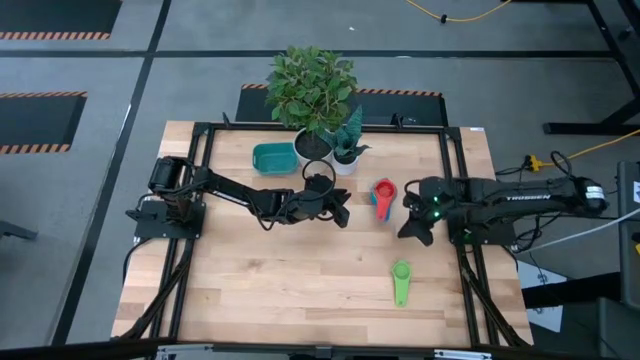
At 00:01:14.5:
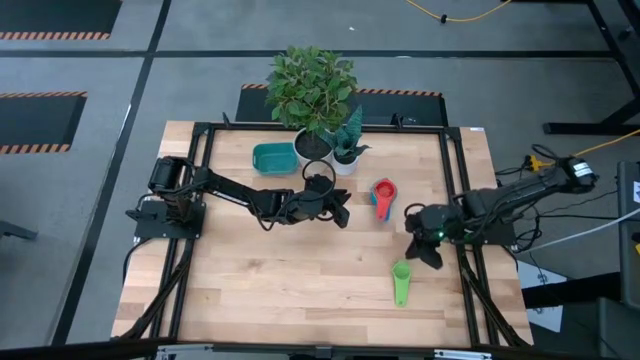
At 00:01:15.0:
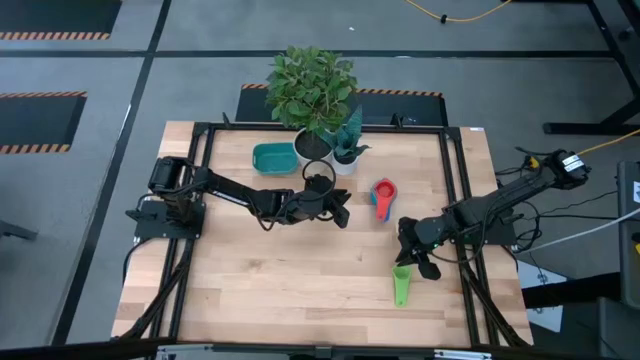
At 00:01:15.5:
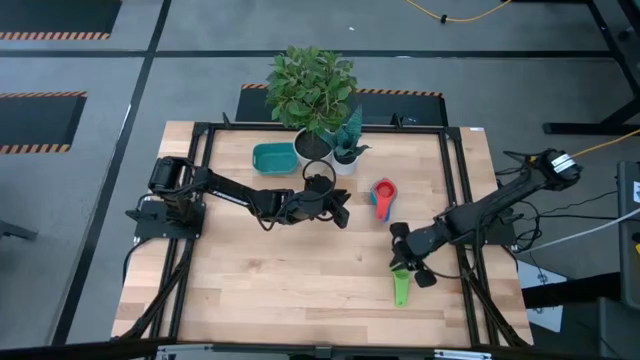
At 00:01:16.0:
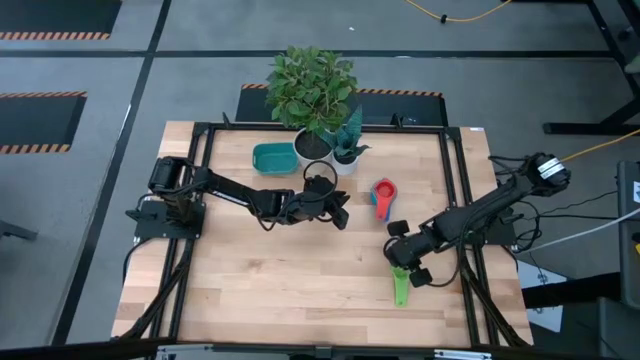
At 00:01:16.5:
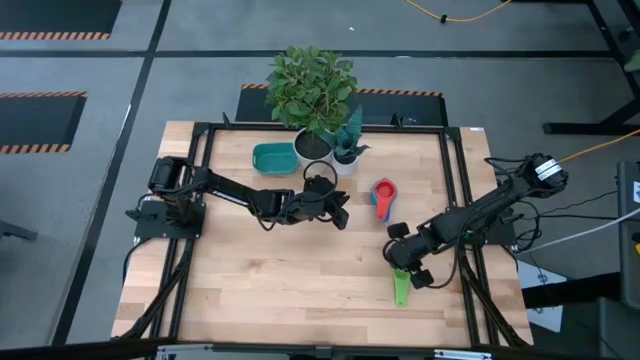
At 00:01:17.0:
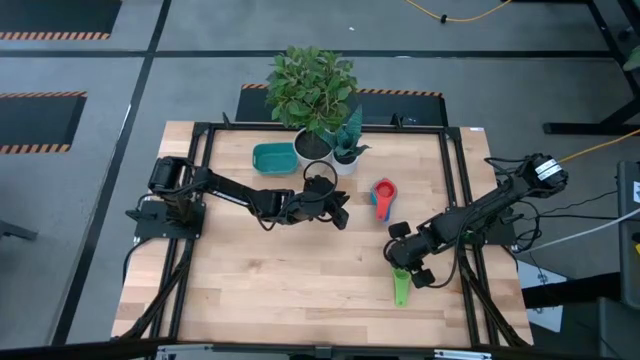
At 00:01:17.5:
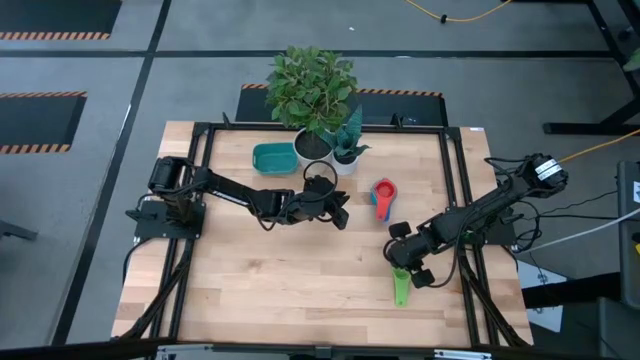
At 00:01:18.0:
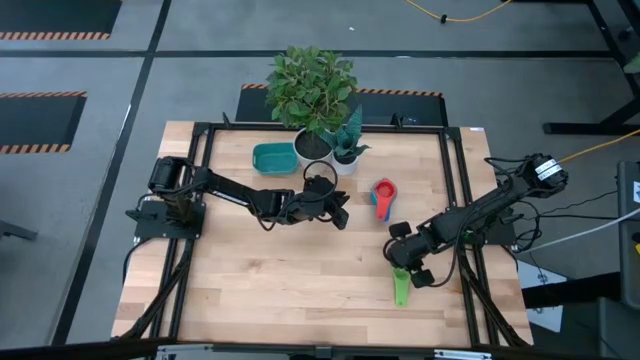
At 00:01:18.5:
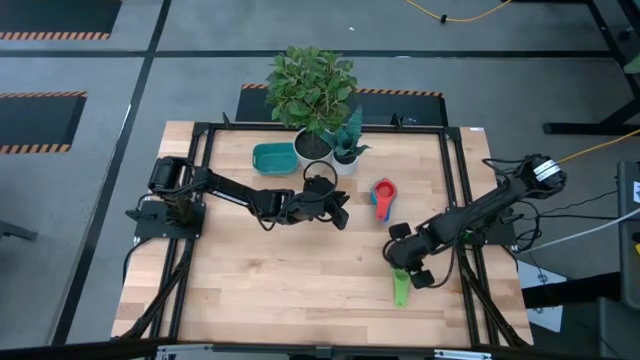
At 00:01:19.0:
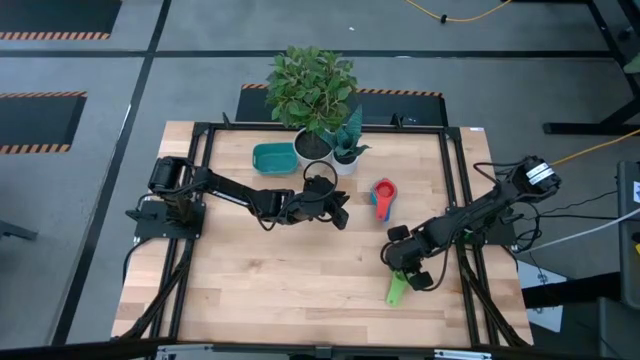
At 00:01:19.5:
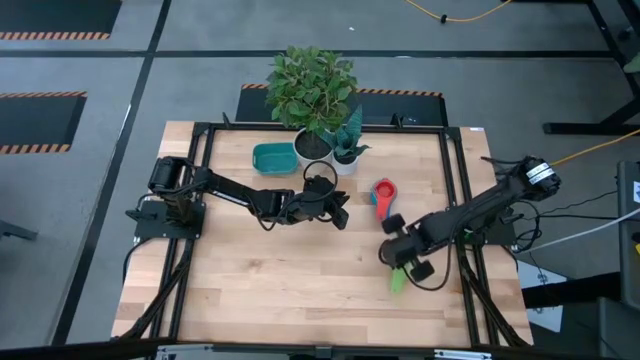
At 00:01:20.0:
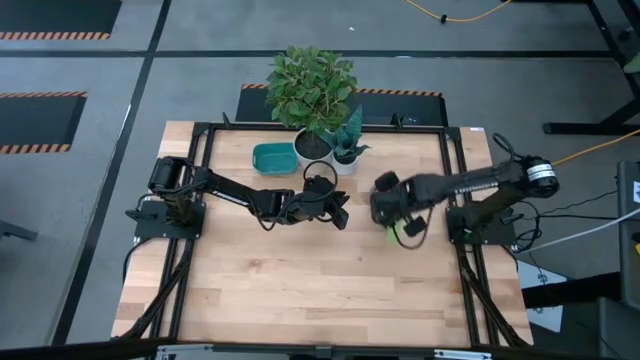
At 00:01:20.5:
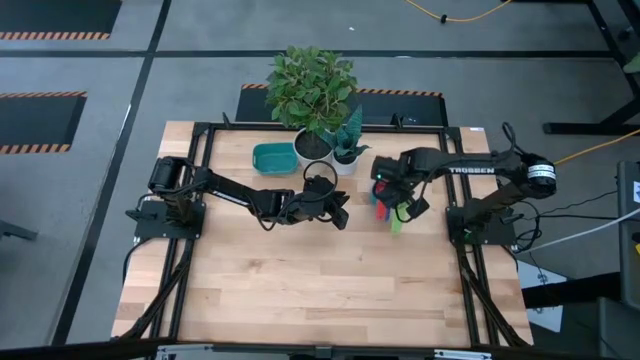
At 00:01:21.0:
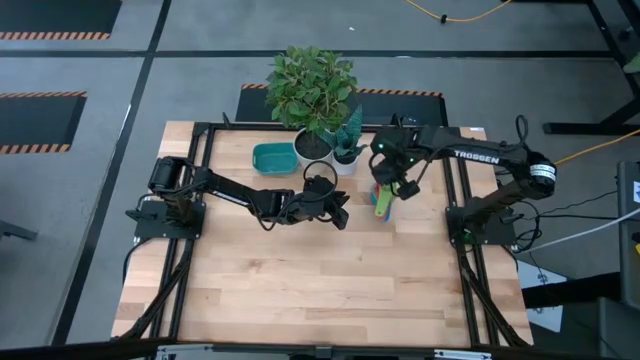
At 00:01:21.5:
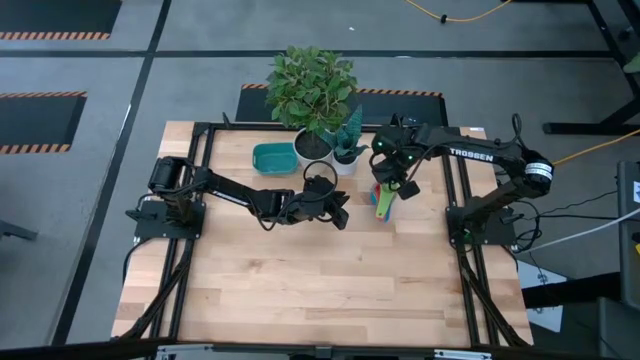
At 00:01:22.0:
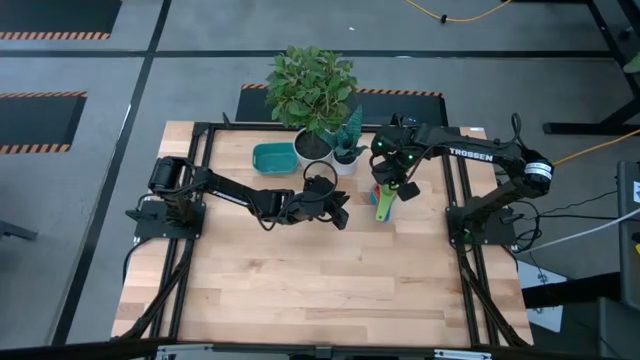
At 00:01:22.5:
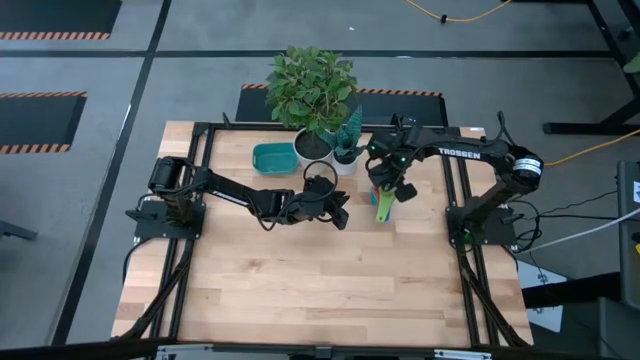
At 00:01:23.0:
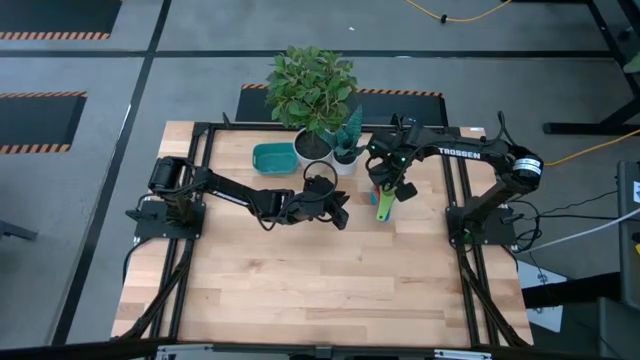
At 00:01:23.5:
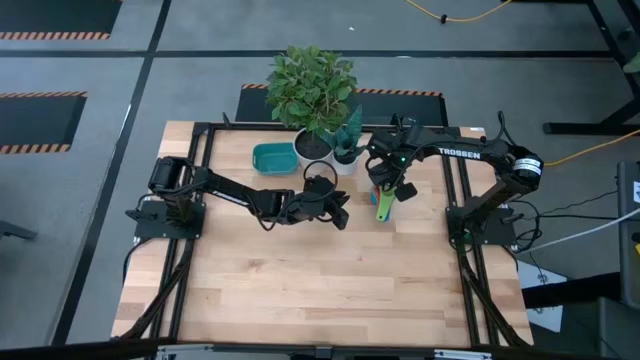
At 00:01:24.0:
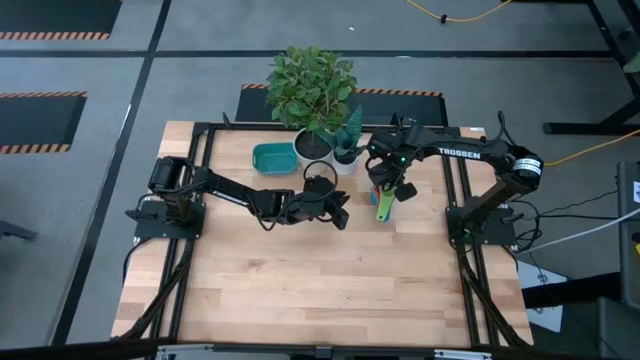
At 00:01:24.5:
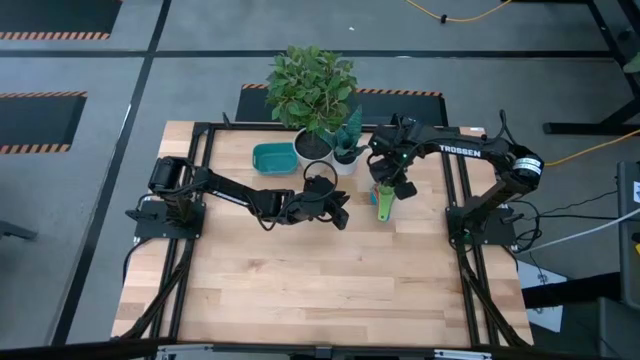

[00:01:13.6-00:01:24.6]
Task: Nest measuring cups in basket
Stack the green measuring cup on top of the red measuring cup

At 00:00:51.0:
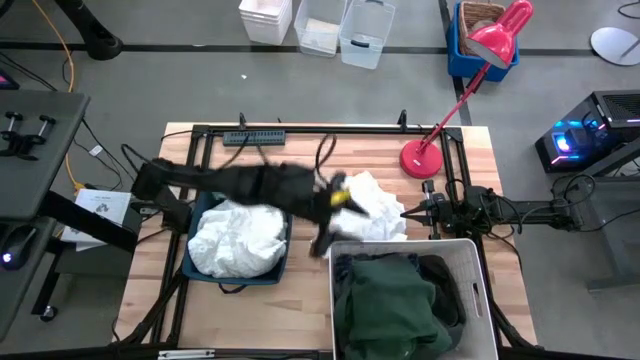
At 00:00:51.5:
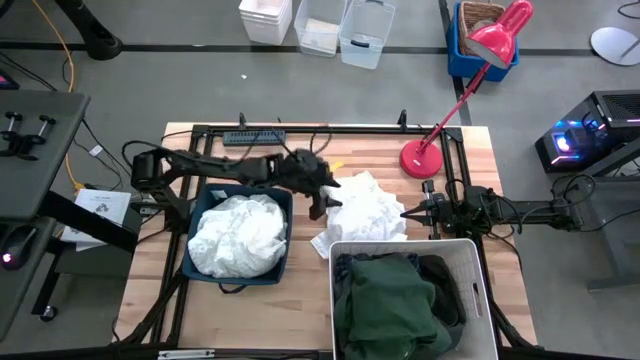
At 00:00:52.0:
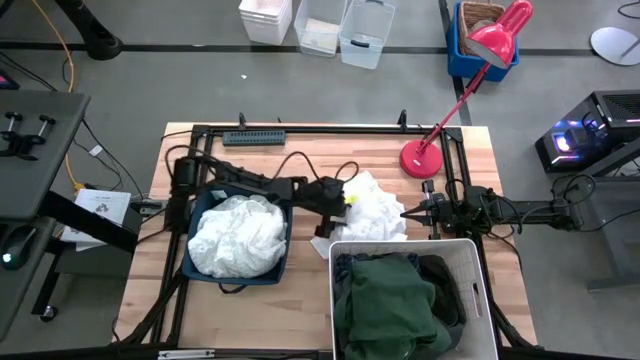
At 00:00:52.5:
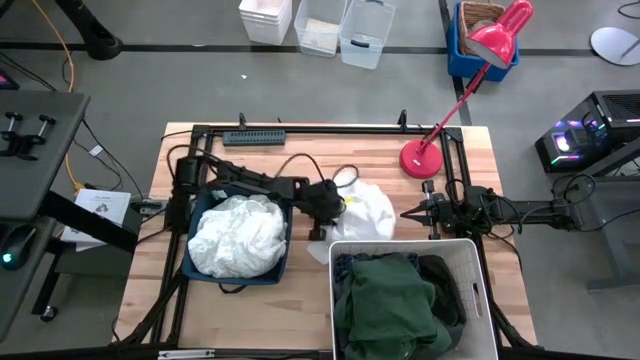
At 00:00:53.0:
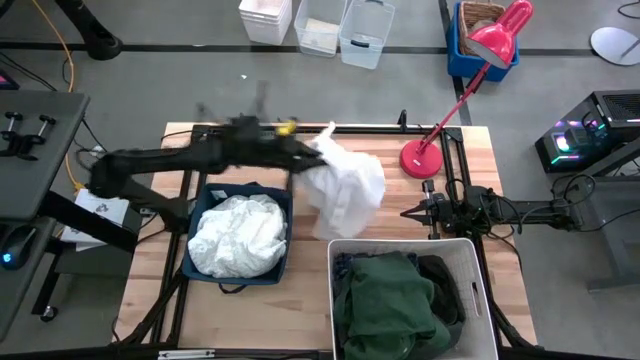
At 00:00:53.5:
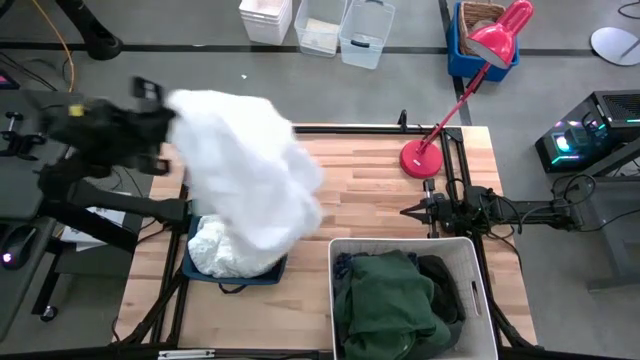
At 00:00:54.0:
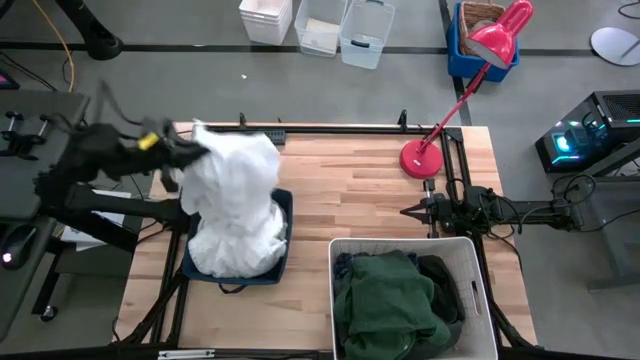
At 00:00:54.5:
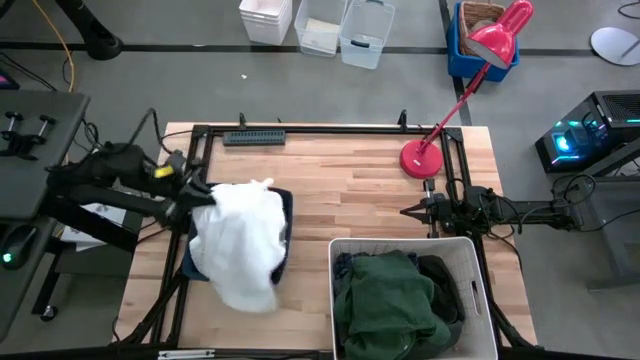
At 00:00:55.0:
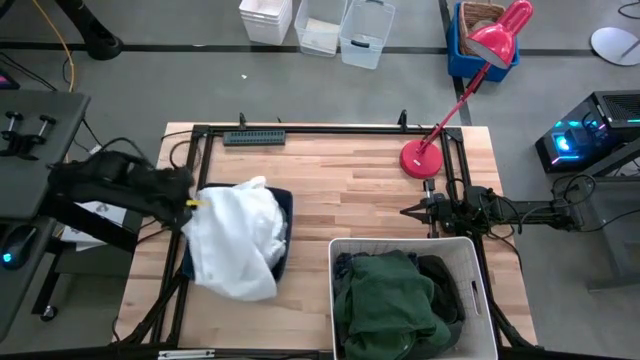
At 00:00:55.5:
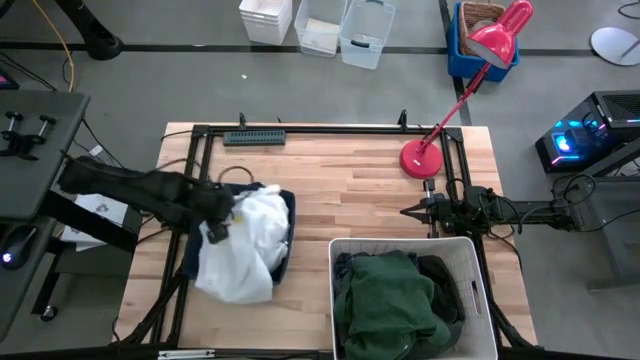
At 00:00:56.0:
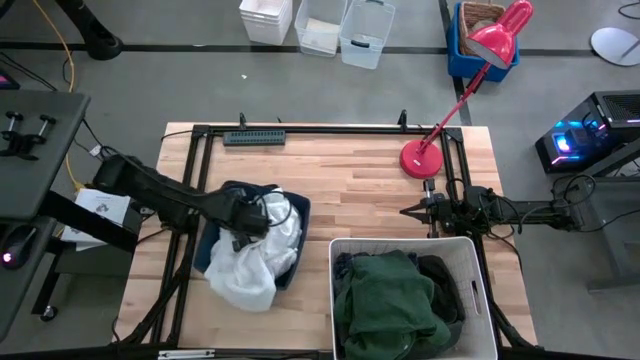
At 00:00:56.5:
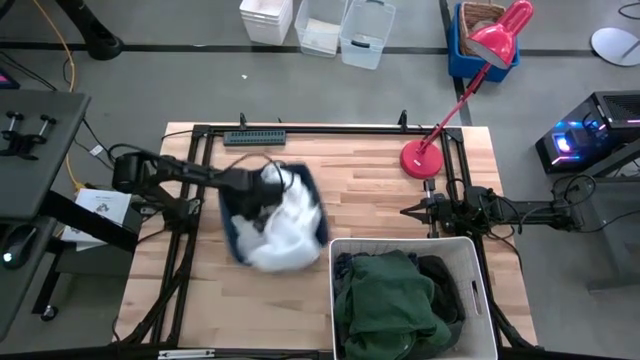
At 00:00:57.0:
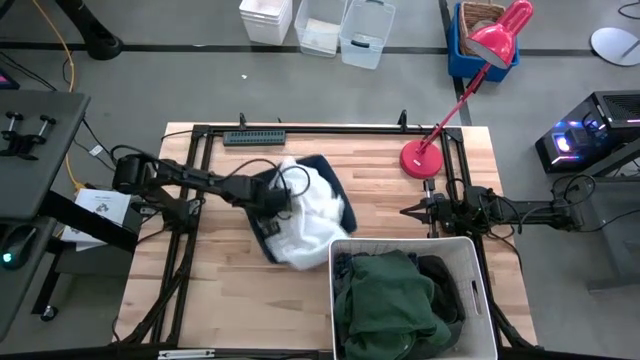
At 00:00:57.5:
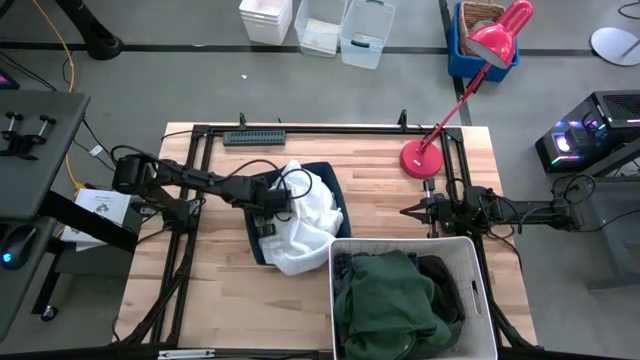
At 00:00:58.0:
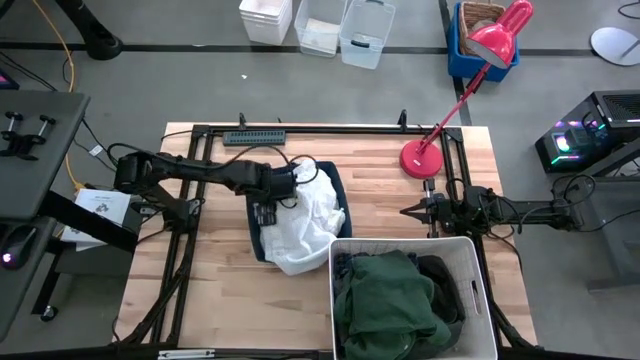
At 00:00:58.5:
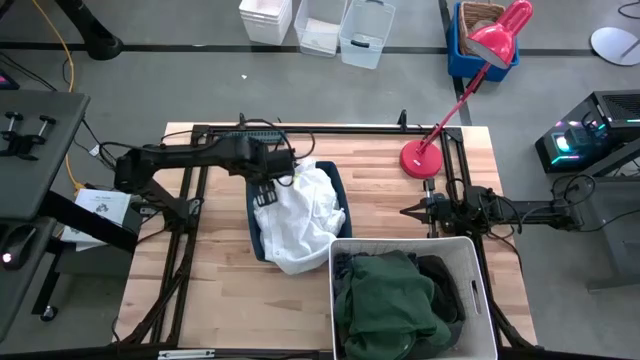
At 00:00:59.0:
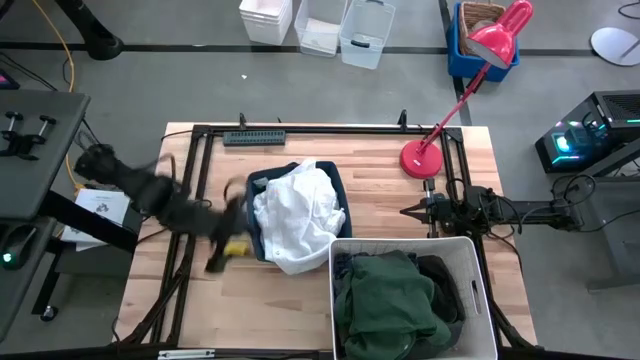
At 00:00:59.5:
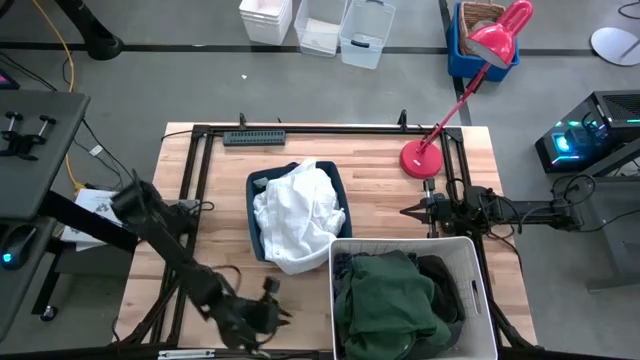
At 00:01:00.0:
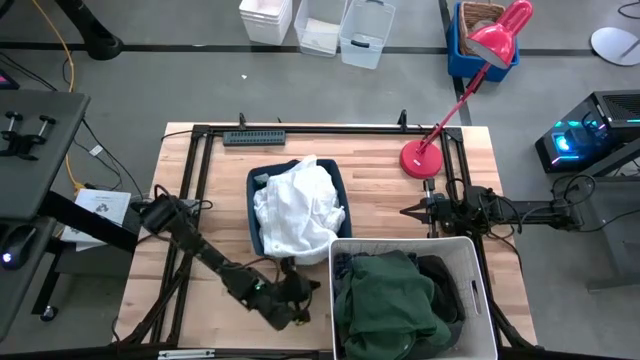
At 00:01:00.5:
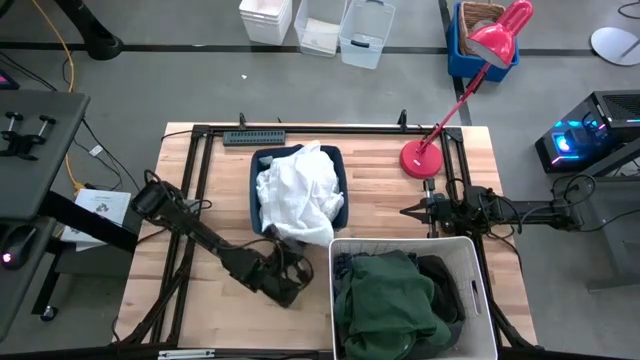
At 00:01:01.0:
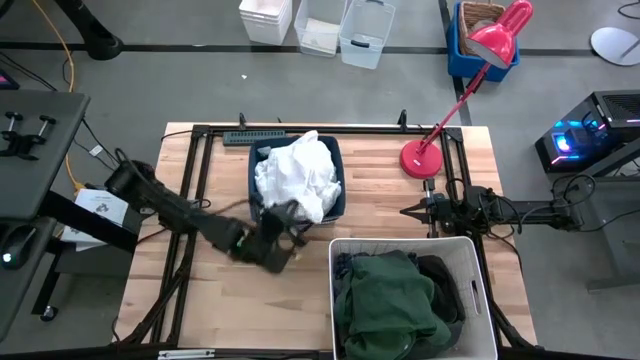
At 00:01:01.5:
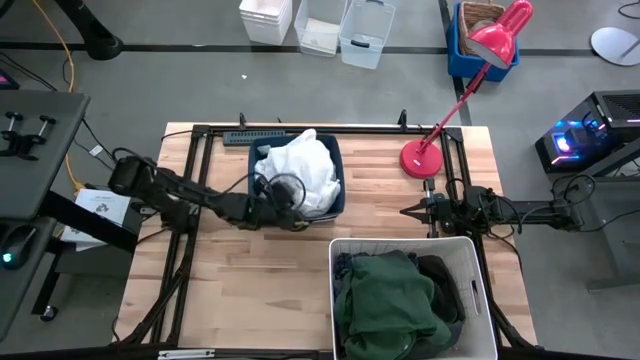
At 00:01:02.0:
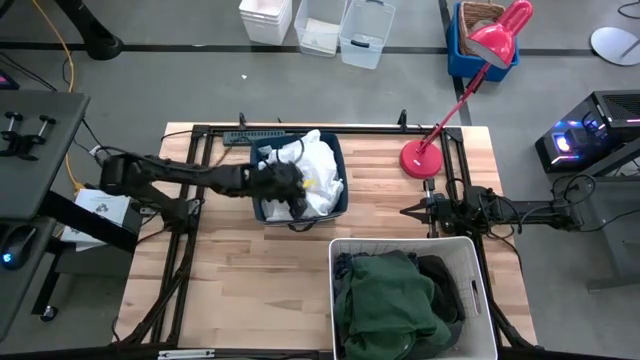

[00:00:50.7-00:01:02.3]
Task: Sort clothes
Put the white polo into the blue laundry bin
